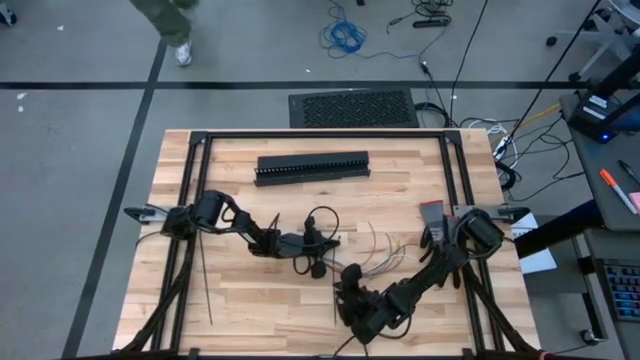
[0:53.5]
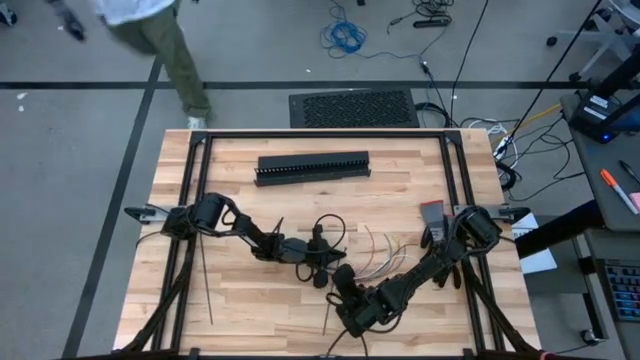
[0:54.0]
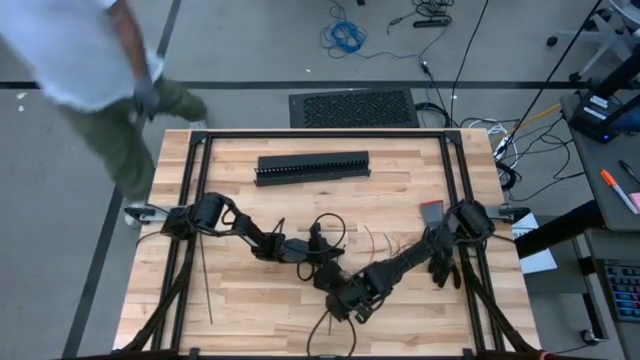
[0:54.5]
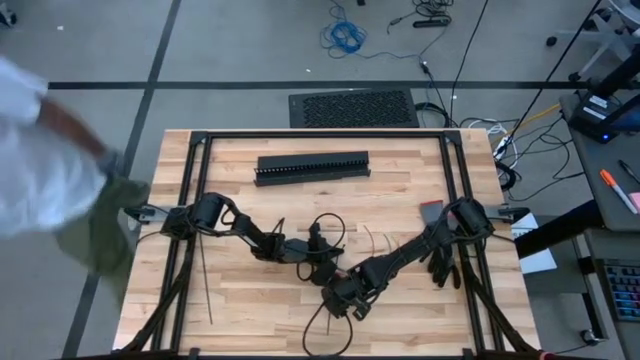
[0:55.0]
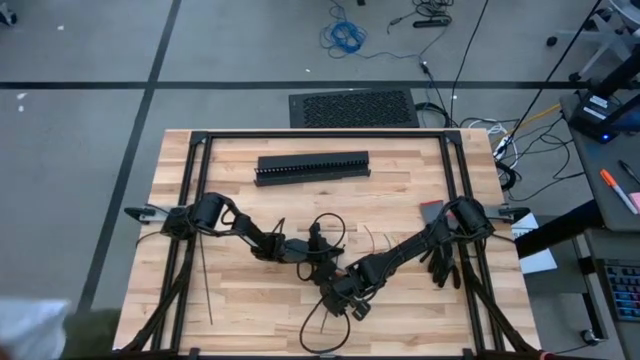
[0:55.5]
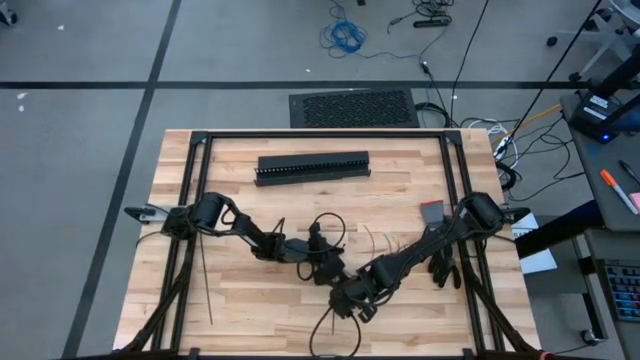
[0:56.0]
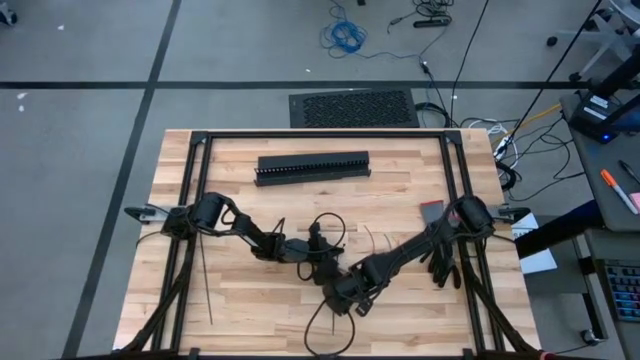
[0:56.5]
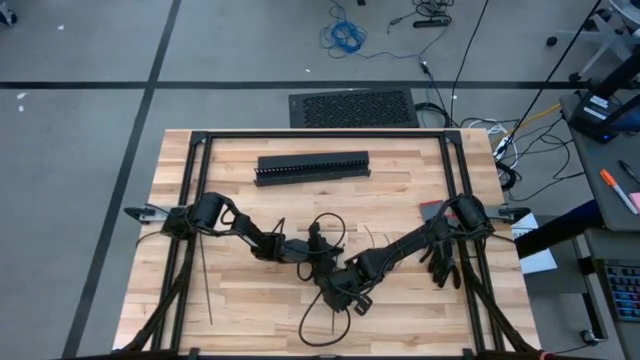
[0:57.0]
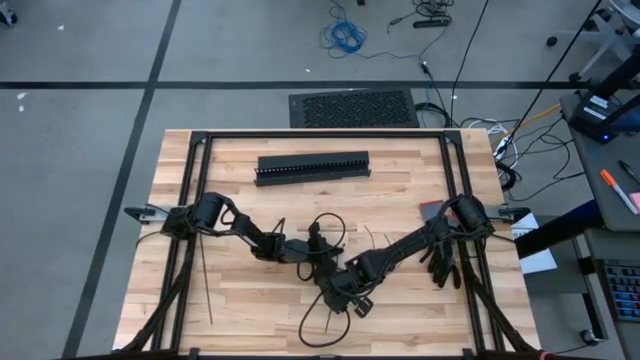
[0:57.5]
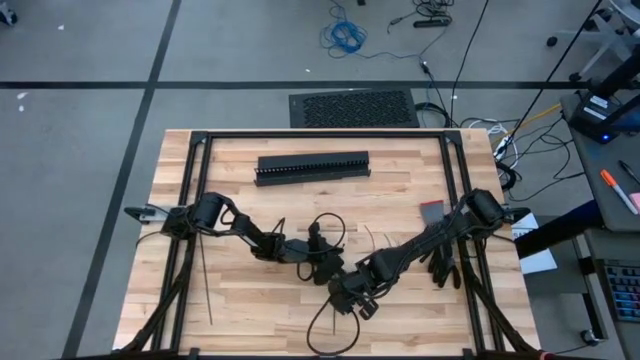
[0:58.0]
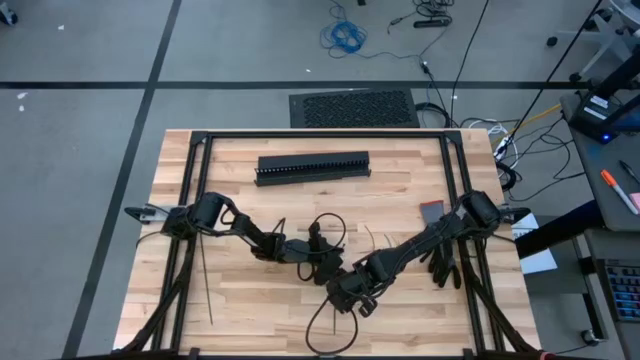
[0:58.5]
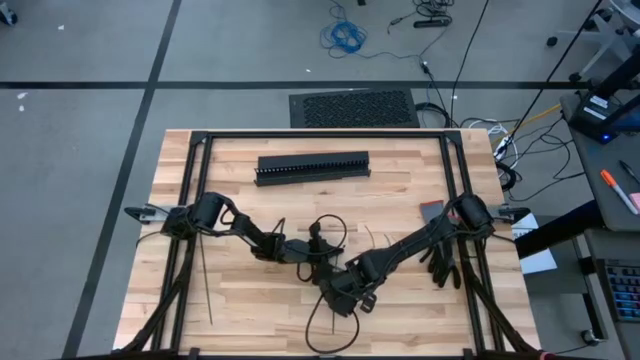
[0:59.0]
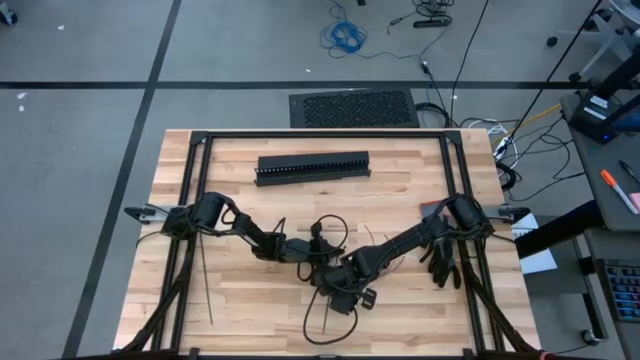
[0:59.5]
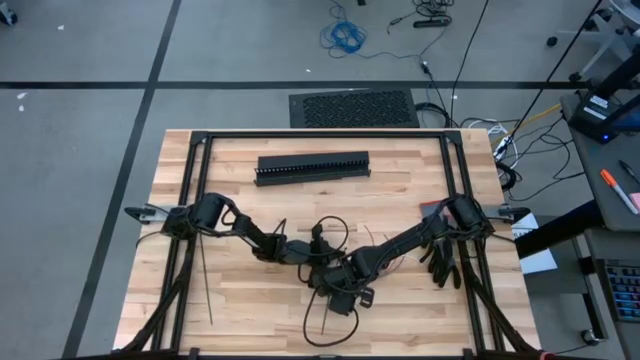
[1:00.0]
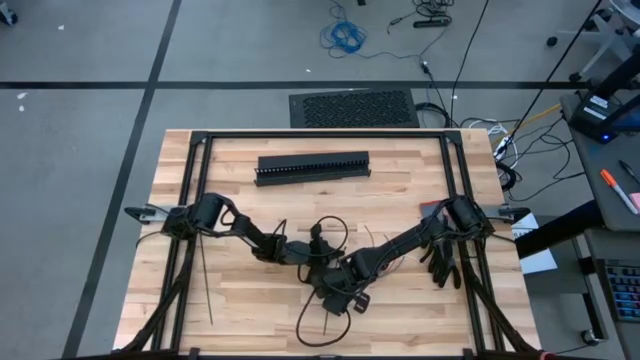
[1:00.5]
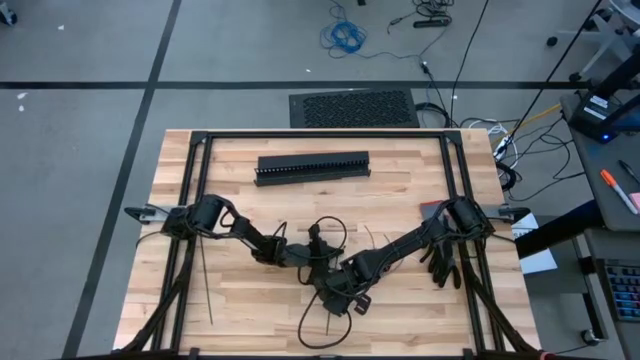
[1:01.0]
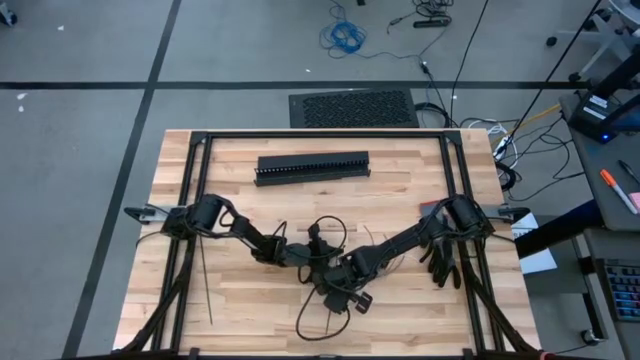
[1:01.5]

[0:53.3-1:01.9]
Task: Ziptie cables
Wrap the cable wires with the black zip tie

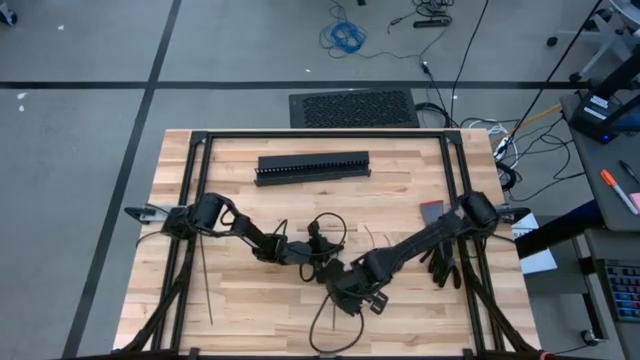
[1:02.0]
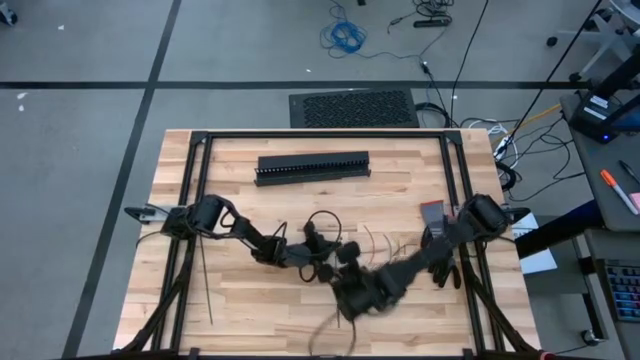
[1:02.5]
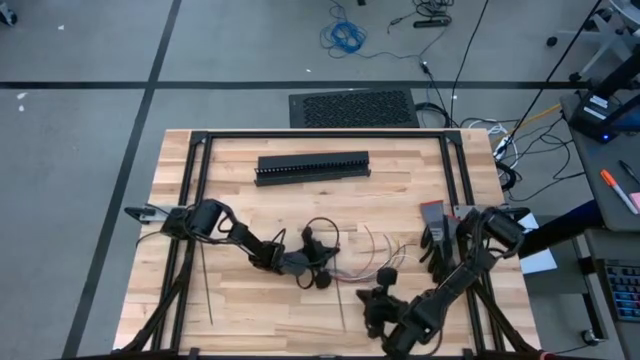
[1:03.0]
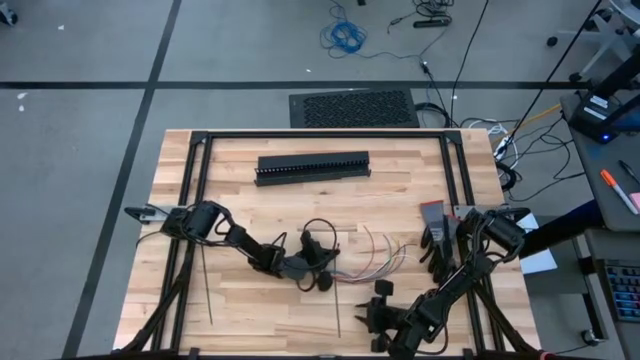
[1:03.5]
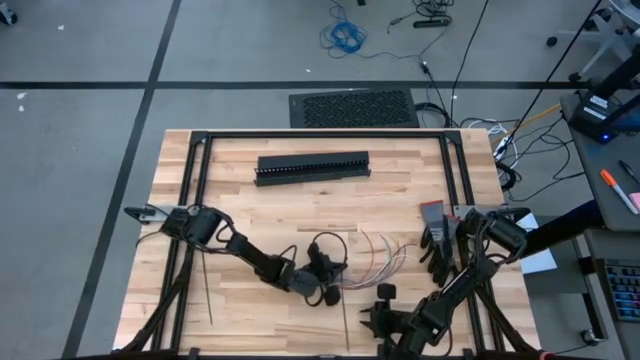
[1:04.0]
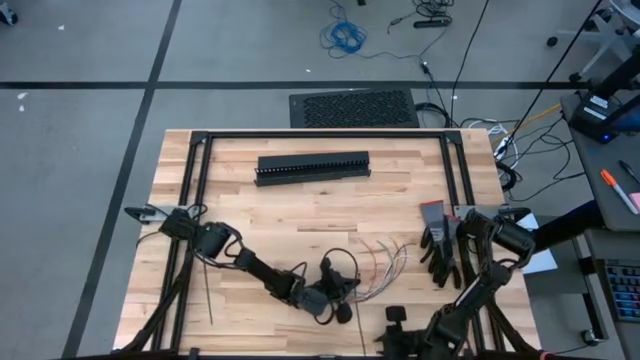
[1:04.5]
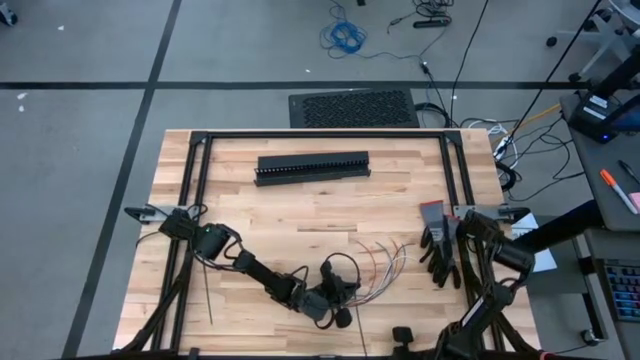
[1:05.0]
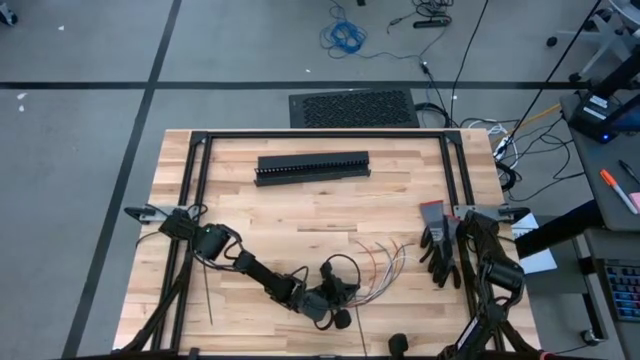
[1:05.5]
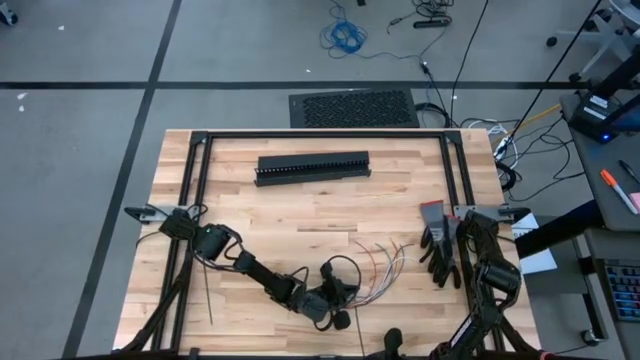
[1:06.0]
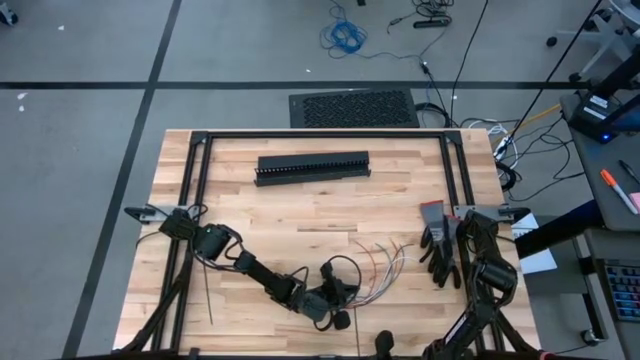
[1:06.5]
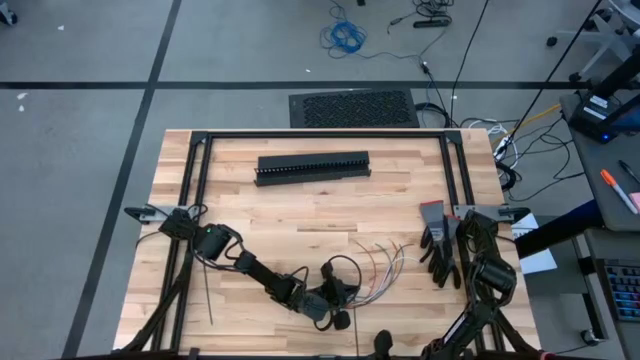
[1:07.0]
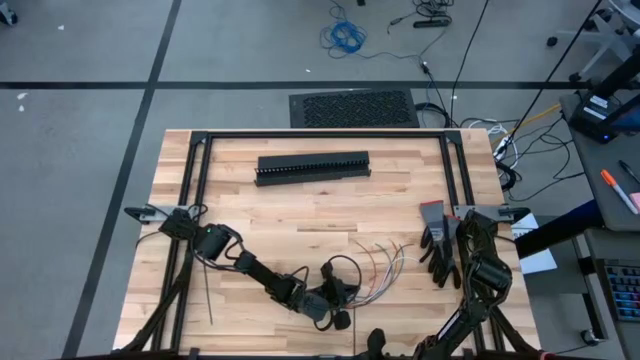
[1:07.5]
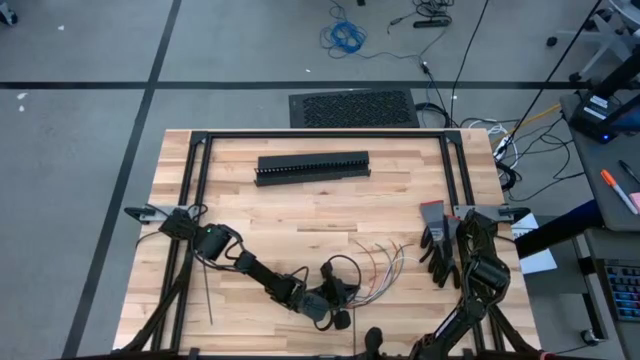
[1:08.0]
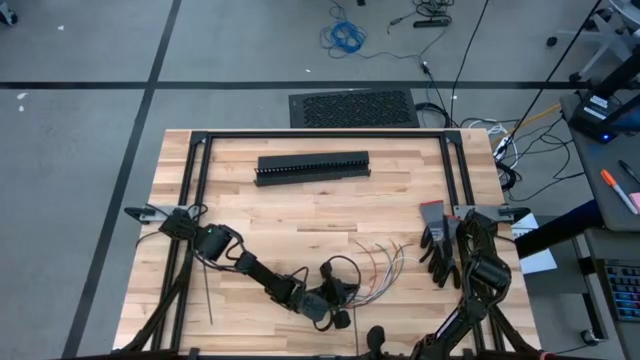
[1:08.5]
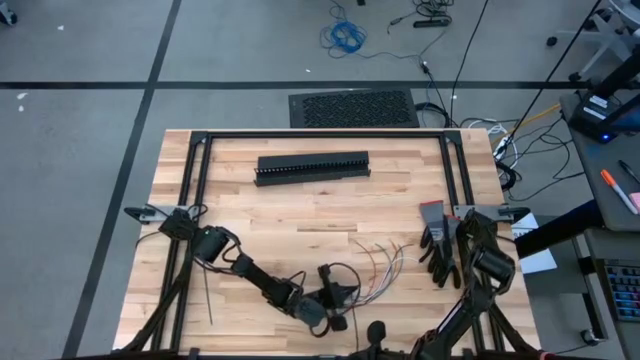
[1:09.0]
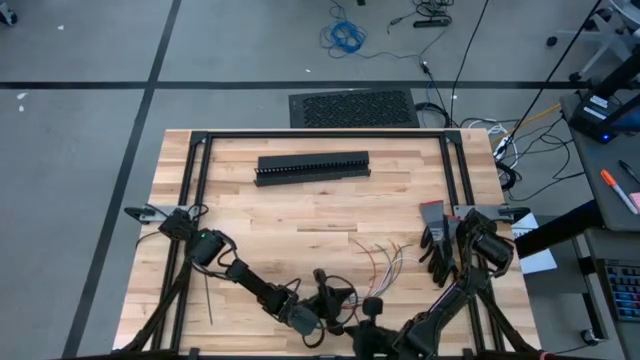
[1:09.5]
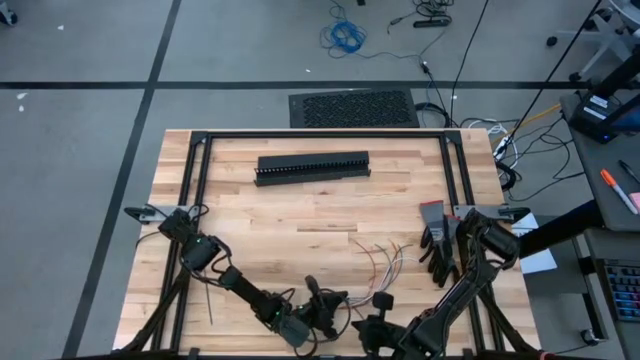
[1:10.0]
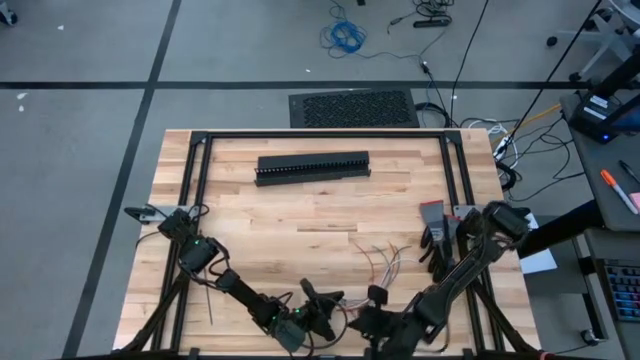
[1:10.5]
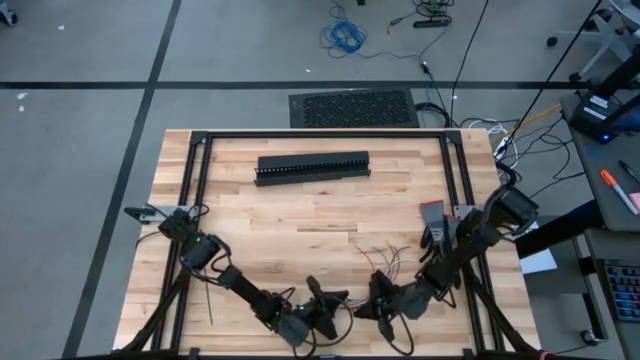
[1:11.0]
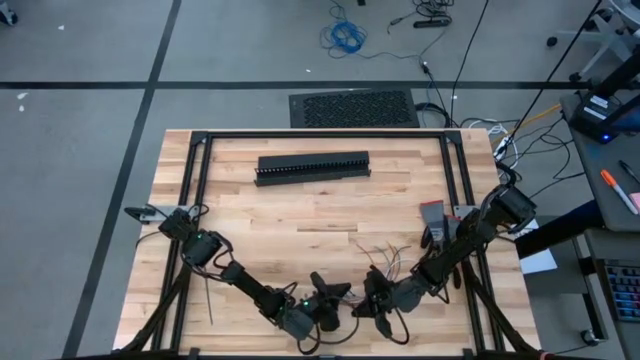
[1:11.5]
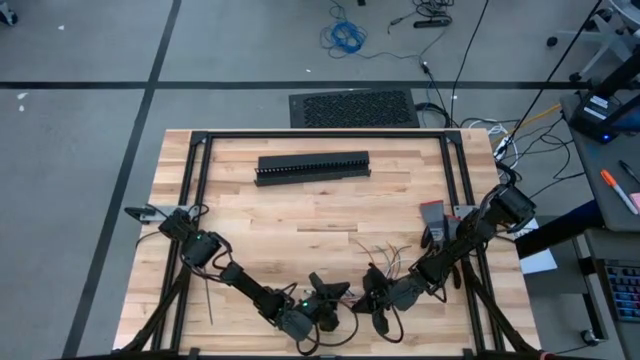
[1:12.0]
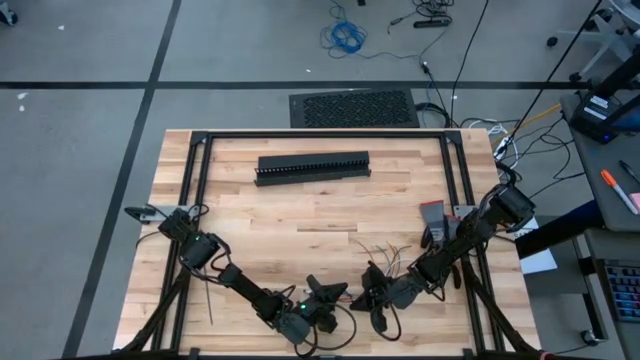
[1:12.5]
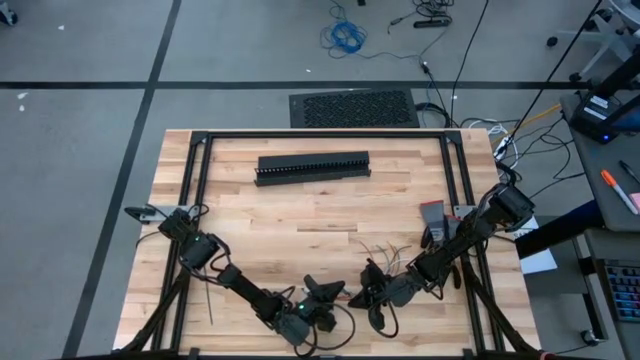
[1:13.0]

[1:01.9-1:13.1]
Wrap the cable wires with the black zip tie
